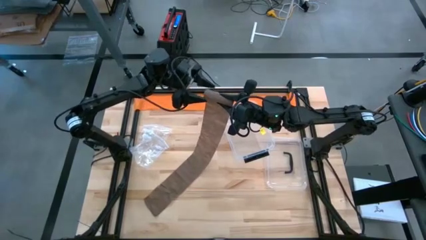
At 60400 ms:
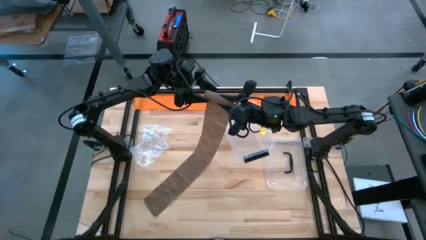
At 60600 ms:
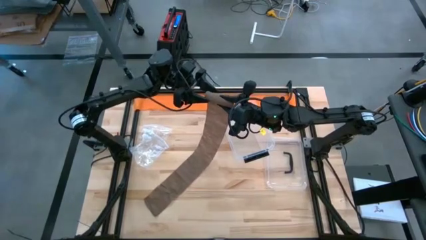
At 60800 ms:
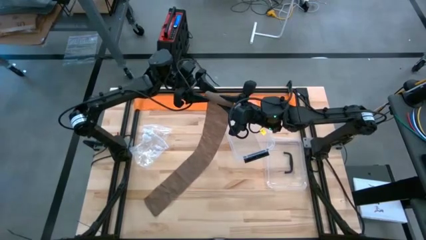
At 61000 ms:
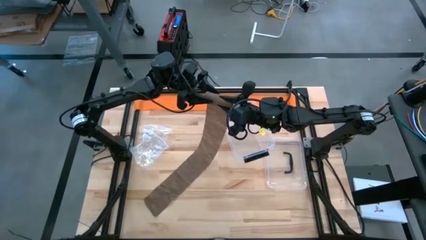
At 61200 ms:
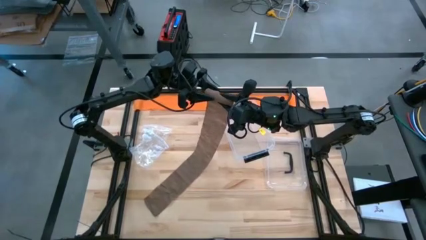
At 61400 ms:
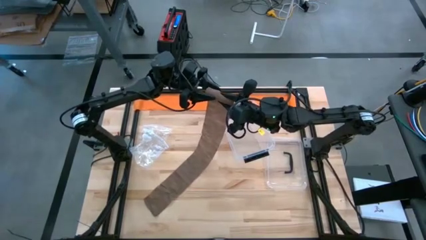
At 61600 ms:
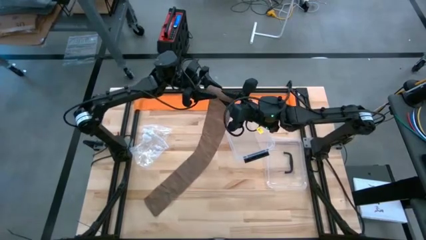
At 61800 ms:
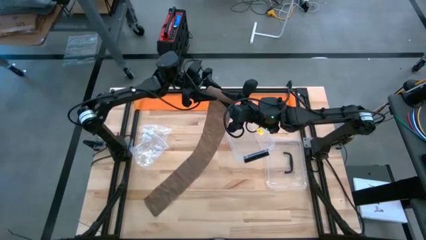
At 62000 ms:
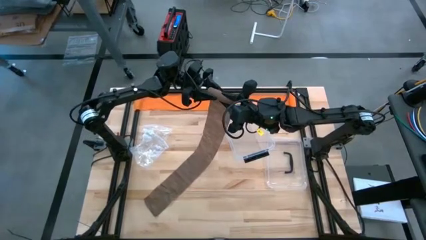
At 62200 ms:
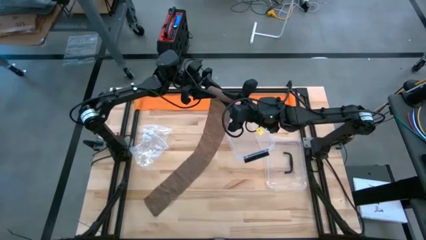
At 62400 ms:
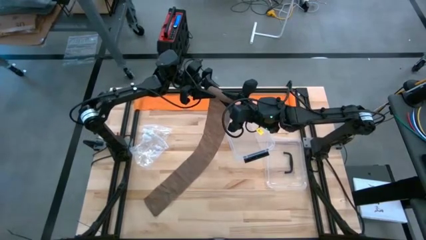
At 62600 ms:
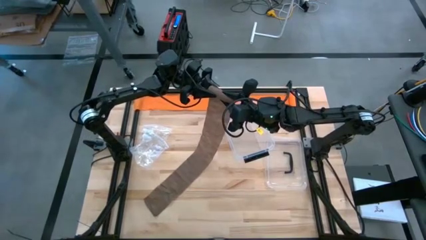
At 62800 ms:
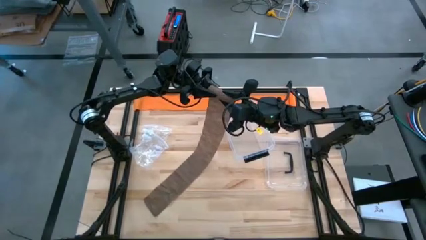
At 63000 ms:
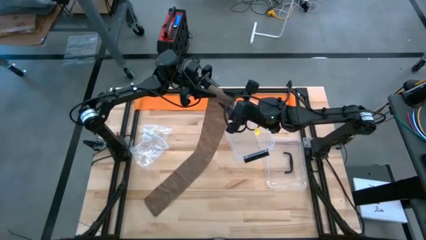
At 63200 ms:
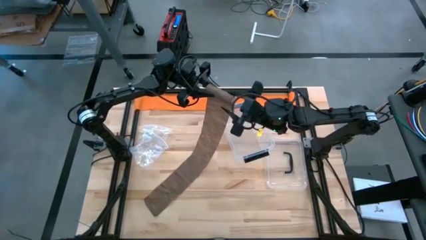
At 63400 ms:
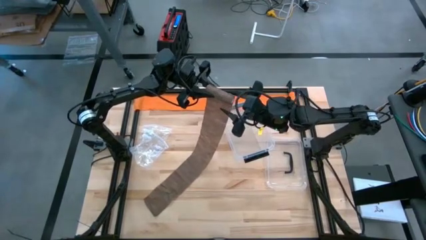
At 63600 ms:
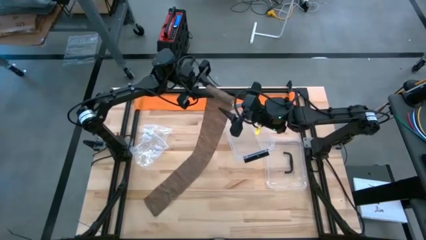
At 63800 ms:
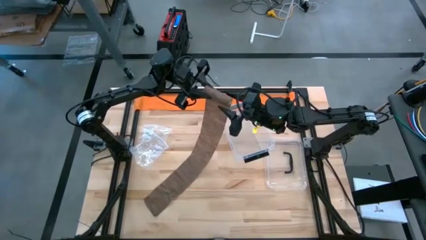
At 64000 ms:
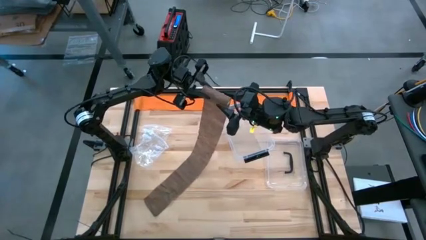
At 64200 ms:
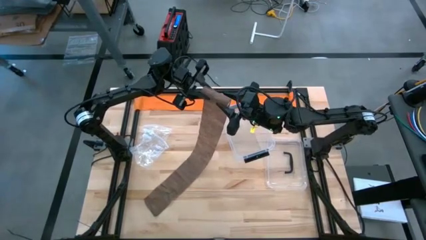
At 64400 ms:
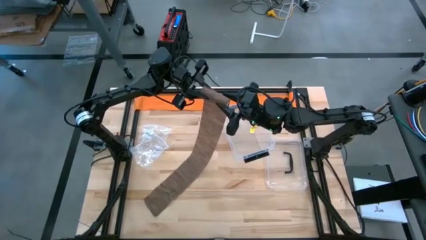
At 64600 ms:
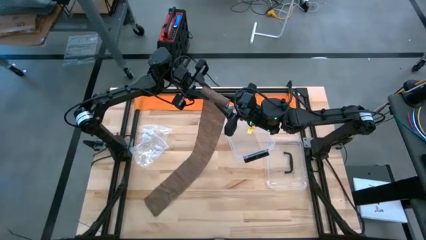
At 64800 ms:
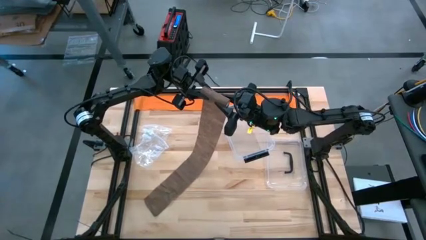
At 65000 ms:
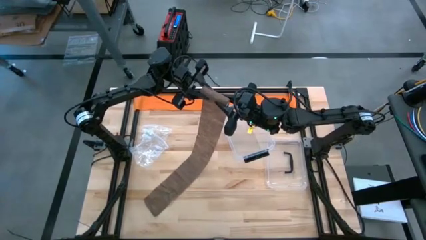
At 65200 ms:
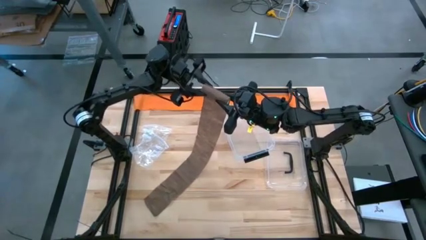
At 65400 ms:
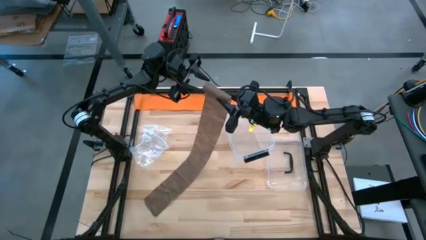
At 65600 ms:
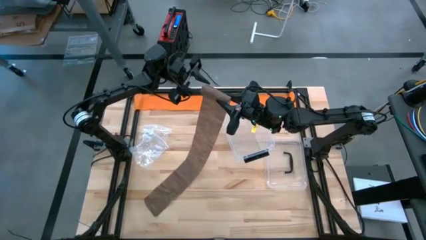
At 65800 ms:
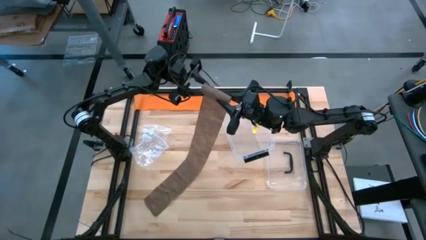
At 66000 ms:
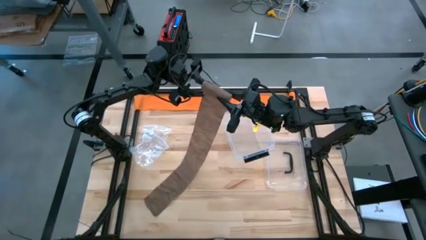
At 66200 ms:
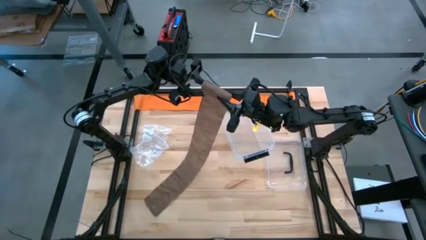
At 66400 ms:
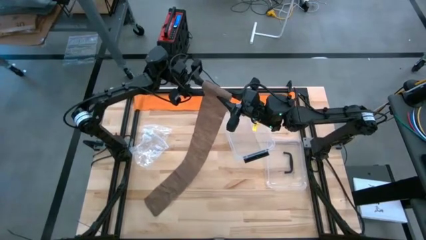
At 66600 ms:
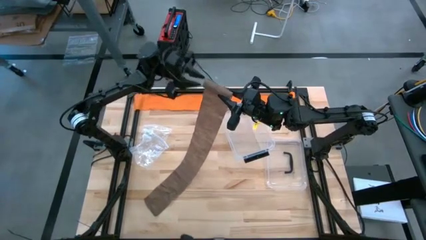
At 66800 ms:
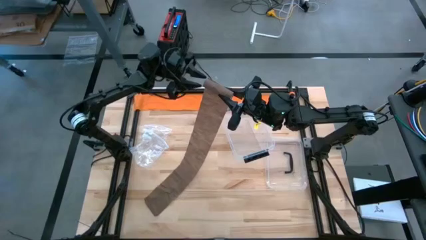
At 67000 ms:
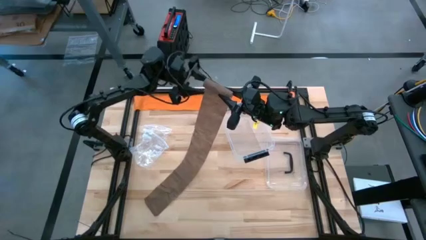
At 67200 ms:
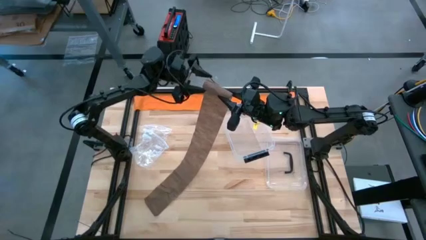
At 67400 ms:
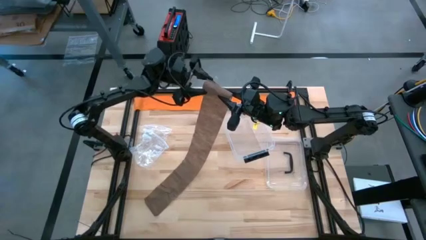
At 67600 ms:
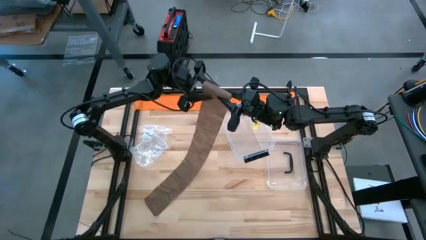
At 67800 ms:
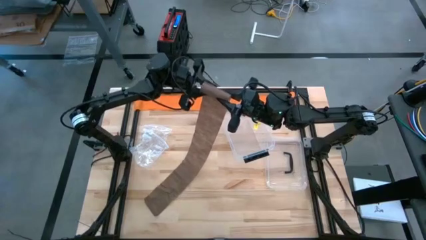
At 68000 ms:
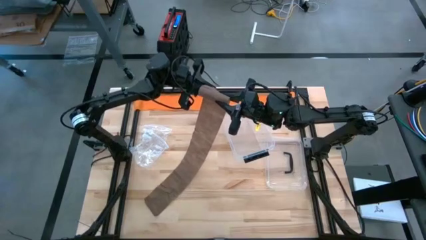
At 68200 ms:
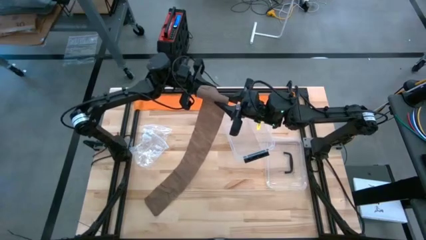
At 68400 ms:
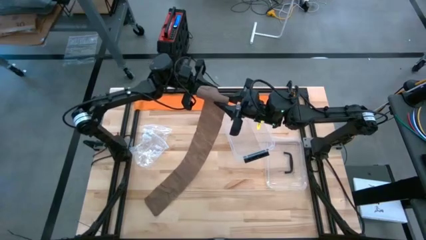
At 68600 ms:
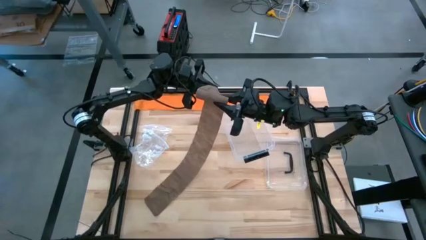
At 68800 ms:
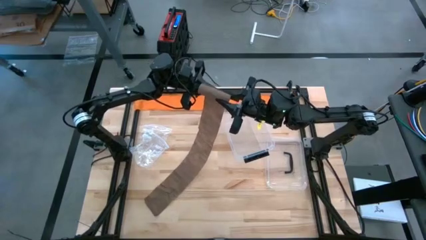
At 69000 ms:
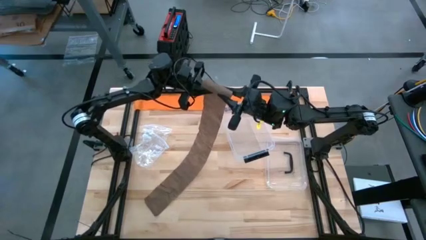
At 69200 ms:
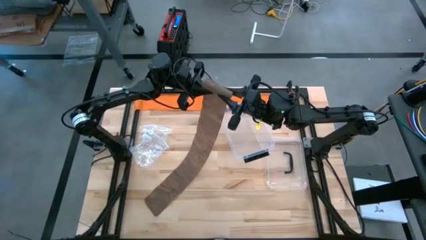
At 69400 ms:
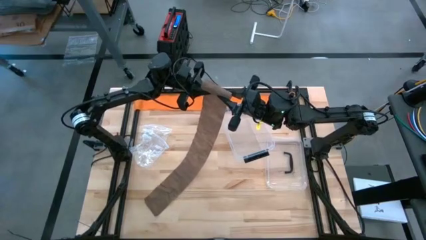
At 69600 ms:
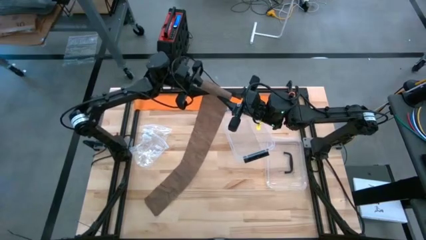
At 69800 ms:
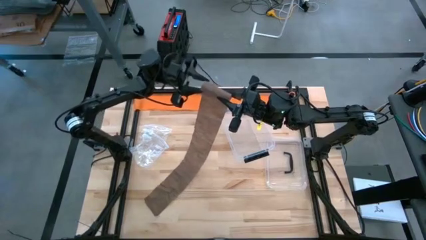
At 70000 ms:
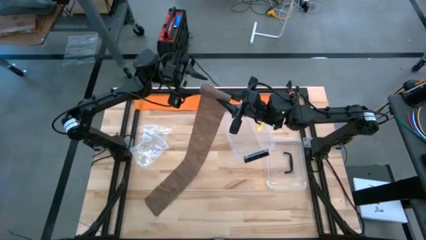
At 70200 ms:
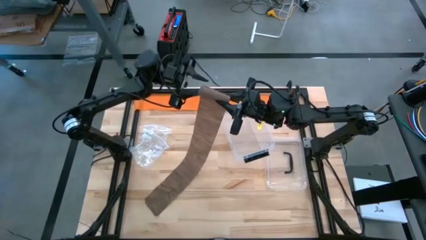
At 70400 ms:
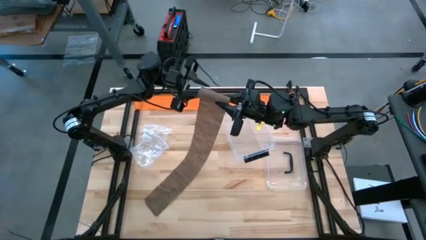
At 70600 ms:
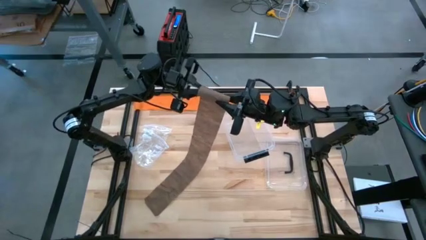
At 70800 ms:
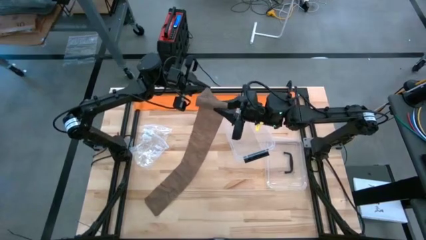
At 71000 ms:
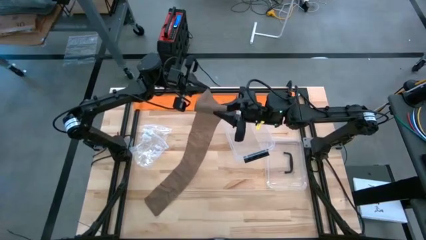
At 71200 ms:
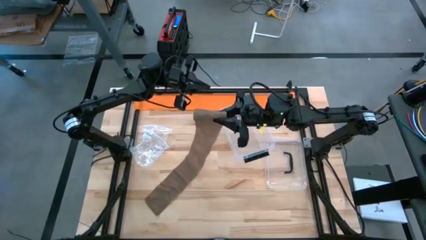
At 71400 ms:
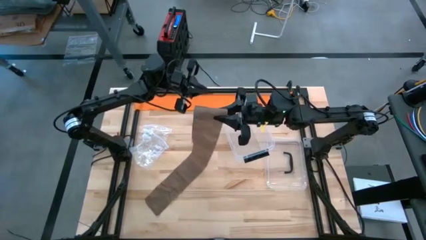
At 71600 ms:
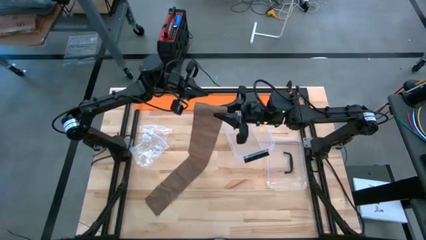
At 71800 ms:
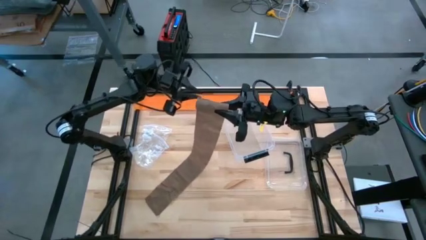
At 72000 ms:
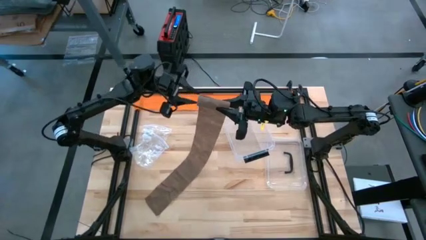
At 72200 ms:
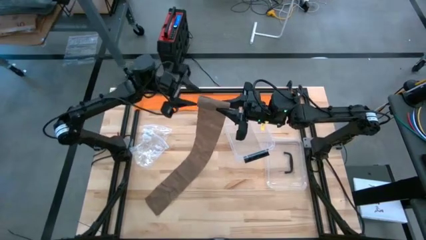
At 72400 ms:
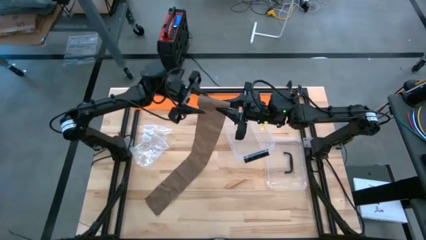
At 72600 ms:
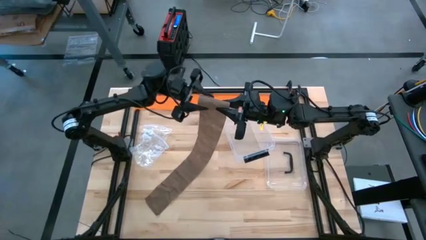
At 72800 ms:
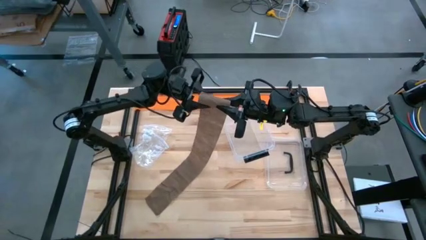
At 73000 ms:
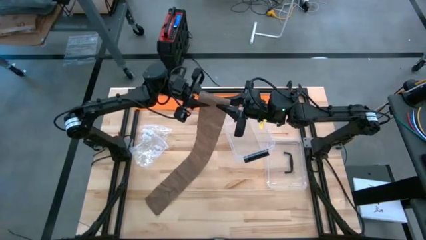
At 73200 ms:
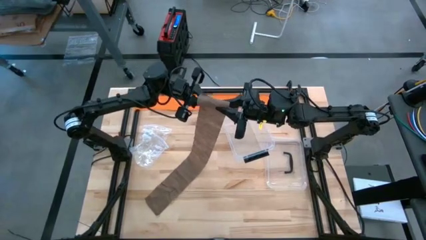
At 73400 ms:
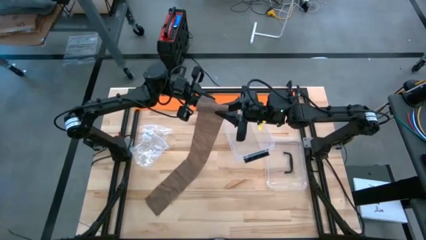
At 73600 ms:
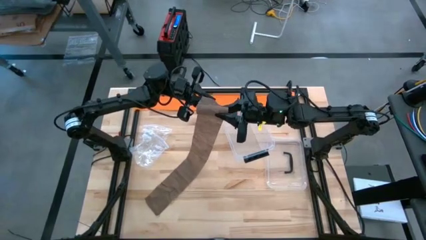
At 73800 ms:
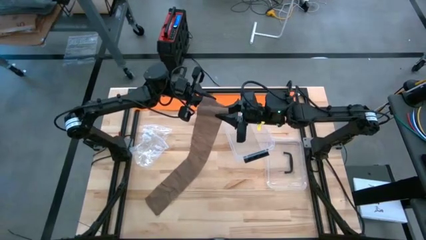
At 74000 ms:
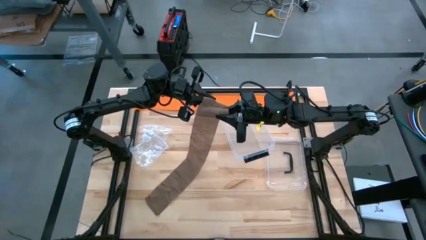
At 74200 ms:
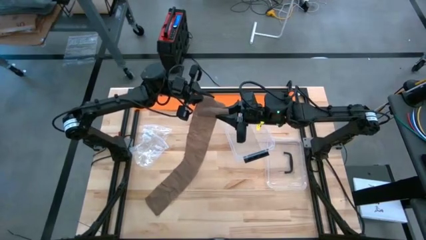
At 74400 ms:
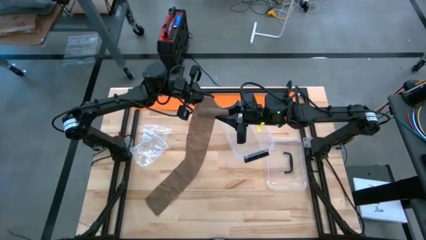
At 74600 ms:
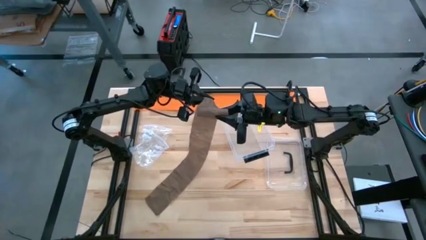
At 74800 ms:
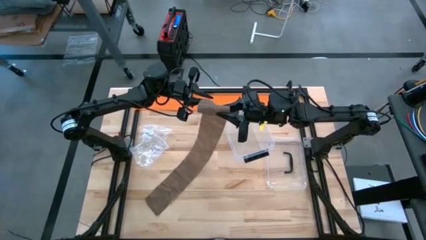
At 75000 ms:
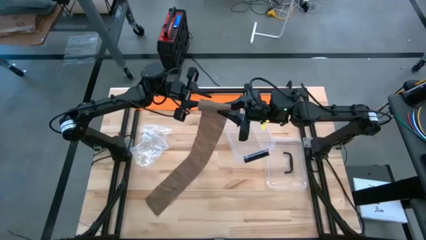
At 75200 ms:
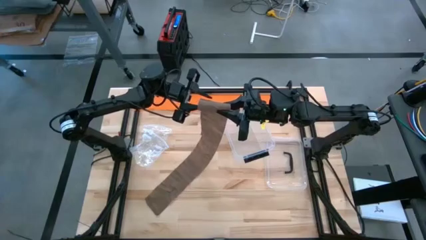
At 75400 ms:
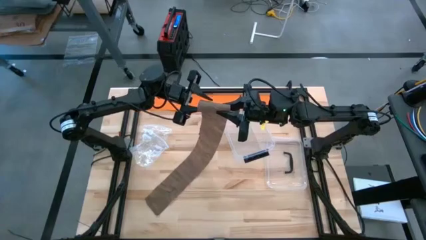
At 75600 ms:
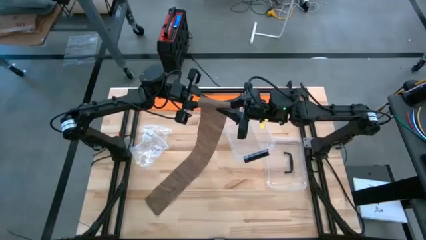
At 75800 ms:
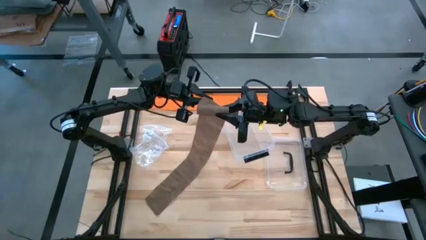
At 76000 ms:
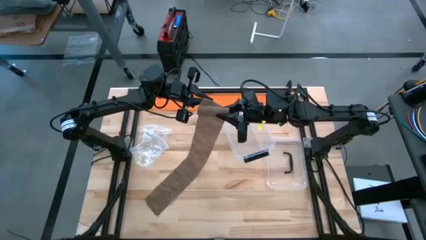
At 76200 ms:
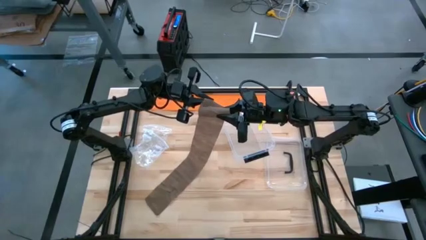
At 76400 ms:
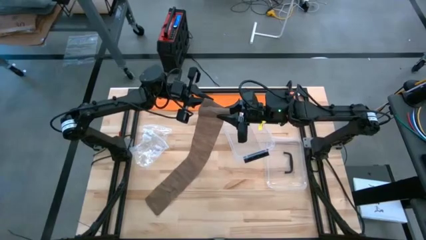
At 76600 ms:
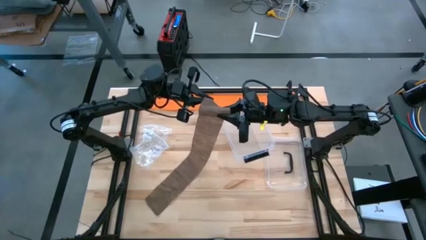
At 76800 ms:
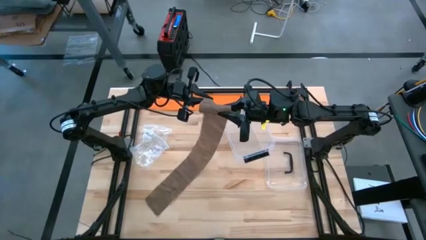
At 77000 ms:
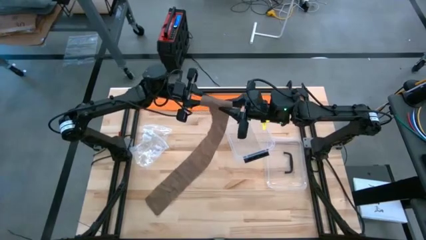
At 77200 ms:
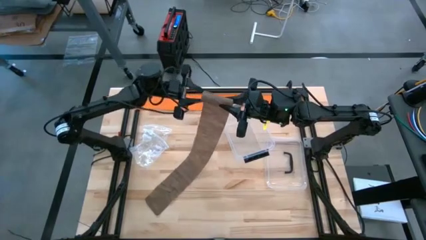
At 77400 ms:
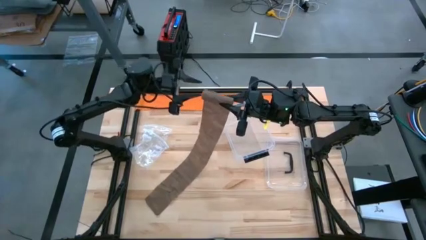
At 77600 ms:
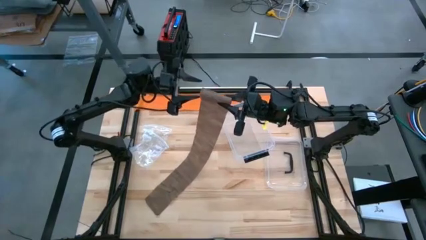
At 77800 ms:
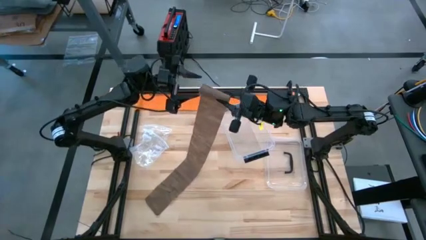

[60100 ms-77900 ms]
Task: Roll bandage
Roll the brown bandage
